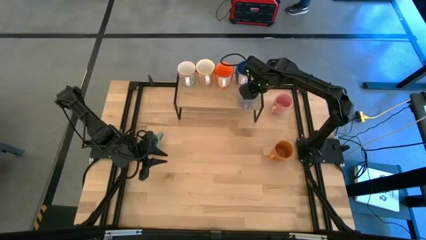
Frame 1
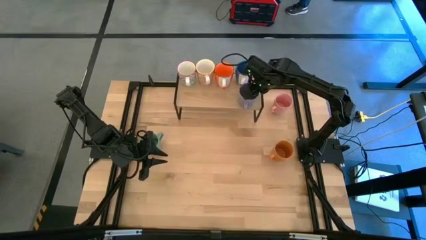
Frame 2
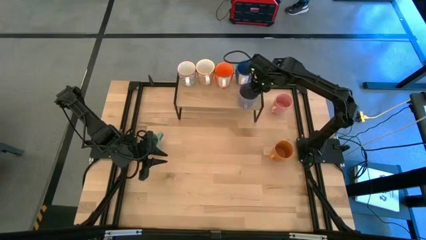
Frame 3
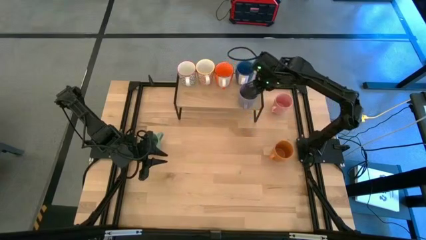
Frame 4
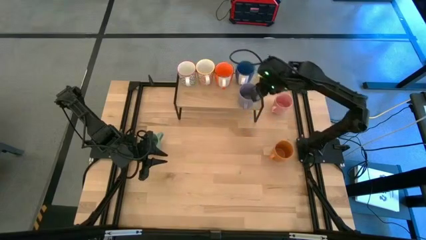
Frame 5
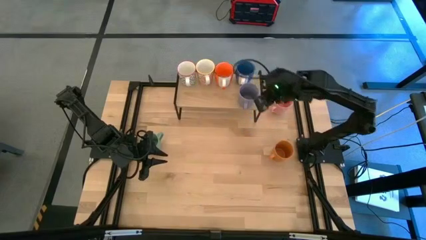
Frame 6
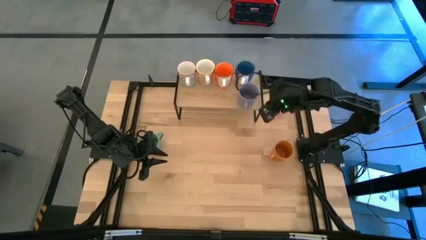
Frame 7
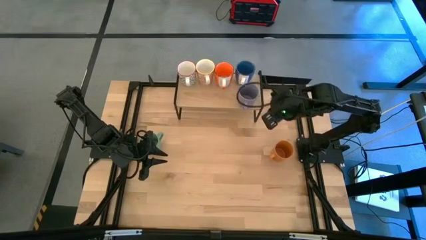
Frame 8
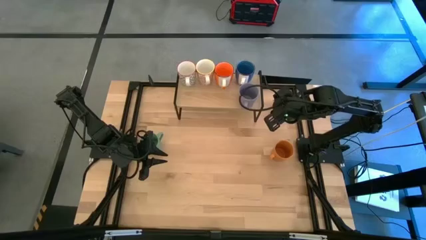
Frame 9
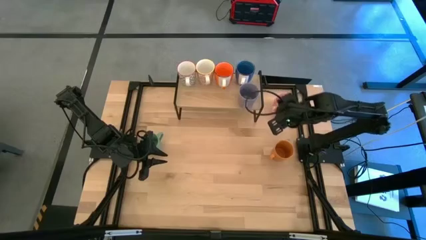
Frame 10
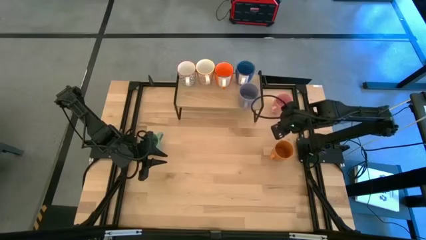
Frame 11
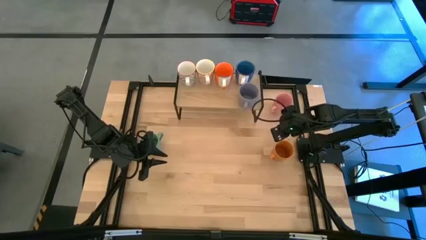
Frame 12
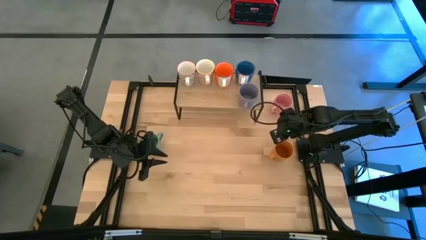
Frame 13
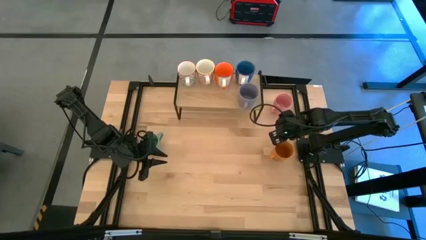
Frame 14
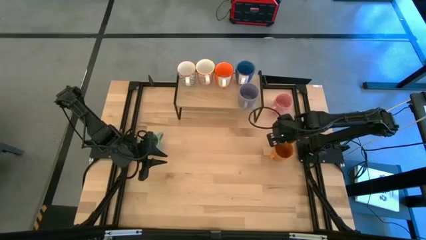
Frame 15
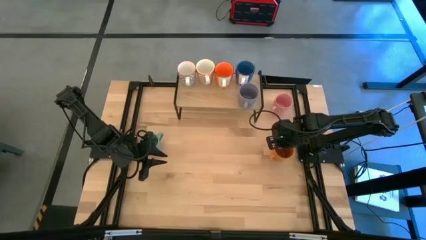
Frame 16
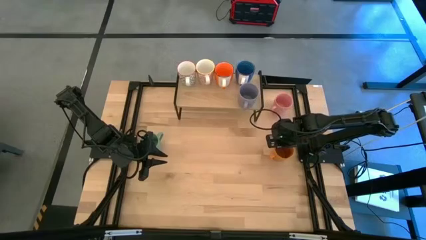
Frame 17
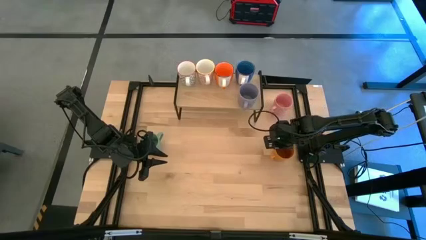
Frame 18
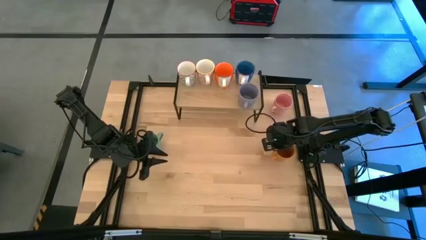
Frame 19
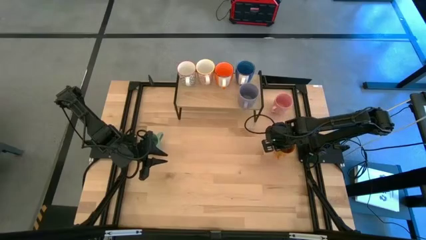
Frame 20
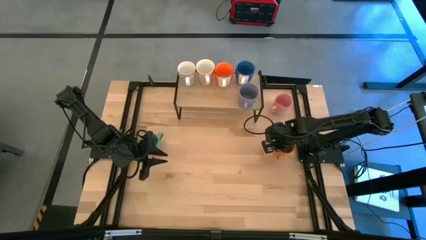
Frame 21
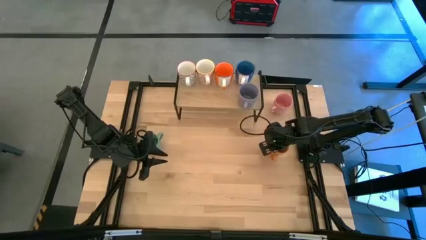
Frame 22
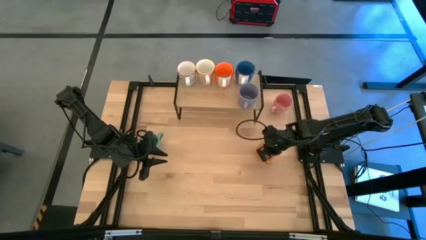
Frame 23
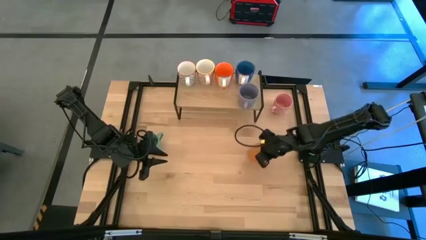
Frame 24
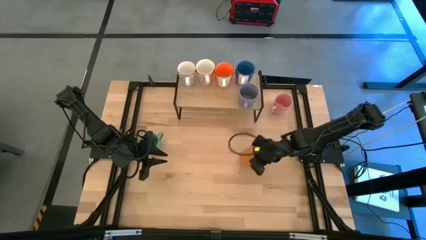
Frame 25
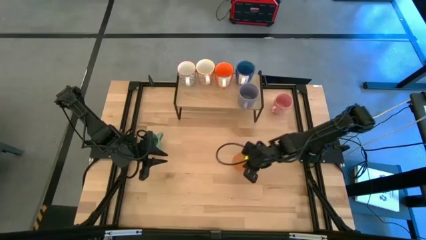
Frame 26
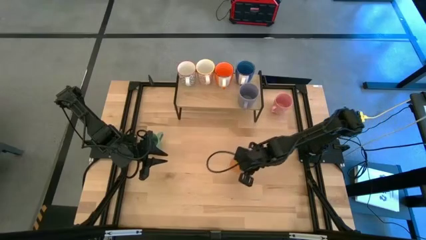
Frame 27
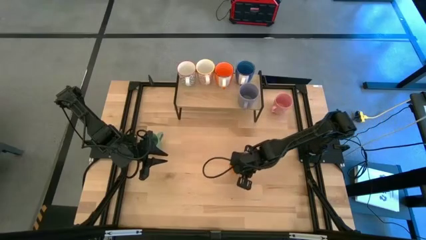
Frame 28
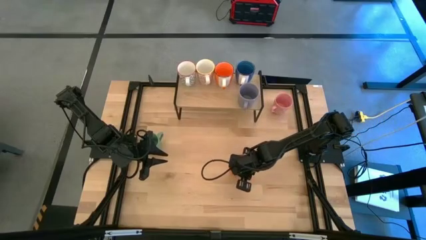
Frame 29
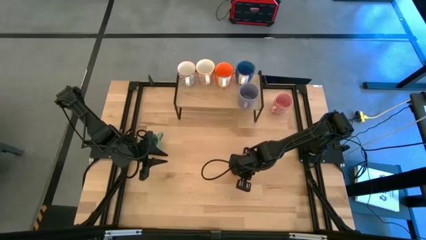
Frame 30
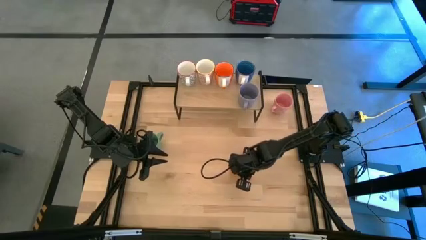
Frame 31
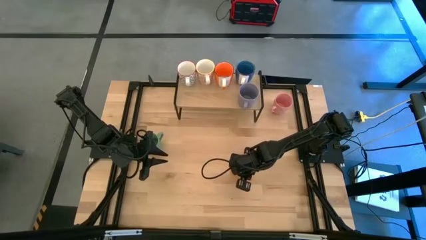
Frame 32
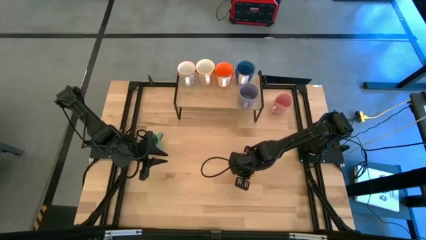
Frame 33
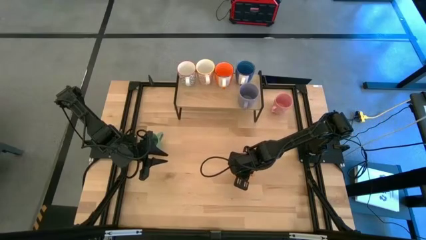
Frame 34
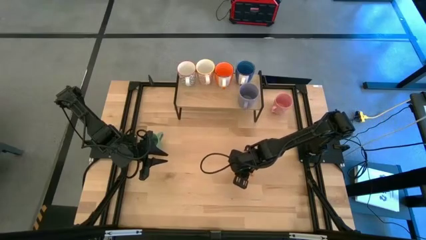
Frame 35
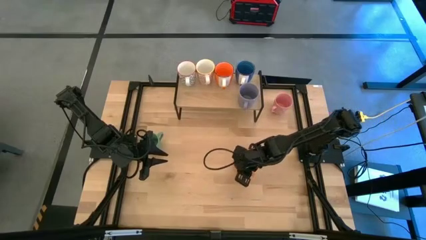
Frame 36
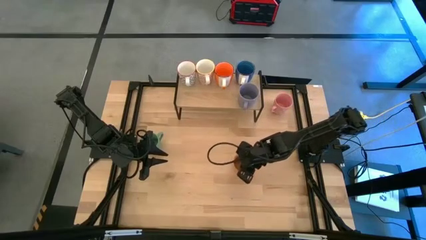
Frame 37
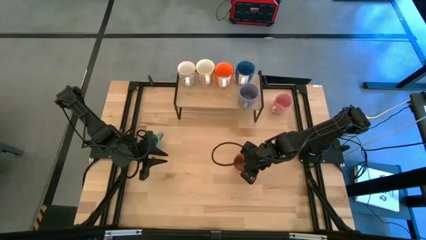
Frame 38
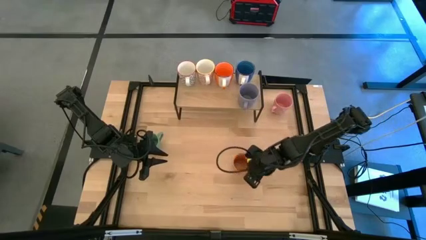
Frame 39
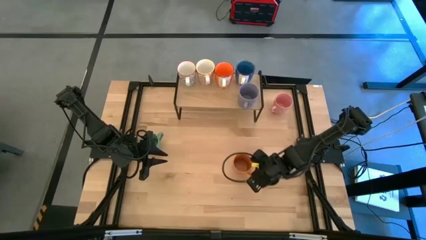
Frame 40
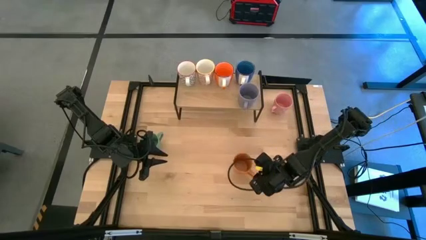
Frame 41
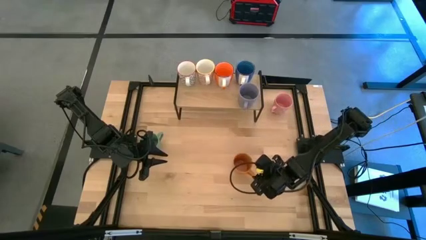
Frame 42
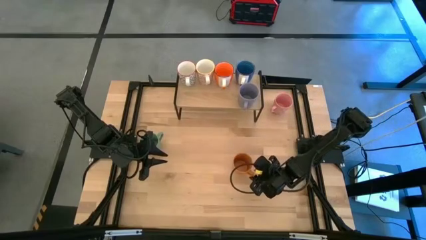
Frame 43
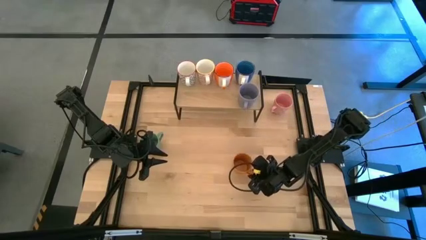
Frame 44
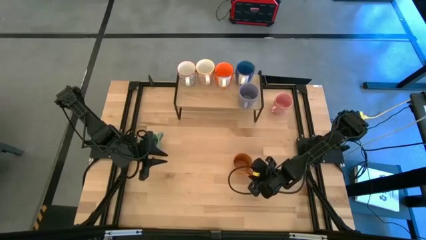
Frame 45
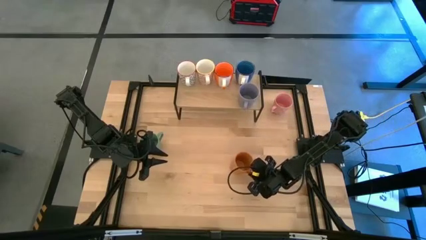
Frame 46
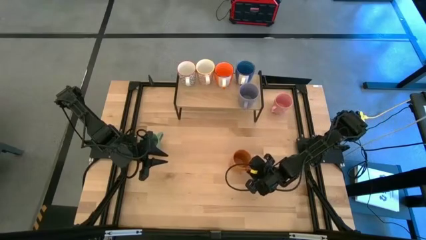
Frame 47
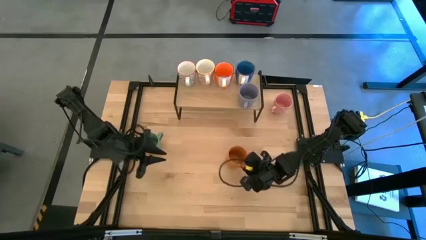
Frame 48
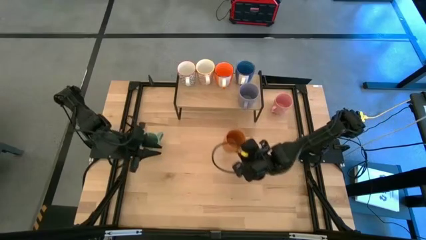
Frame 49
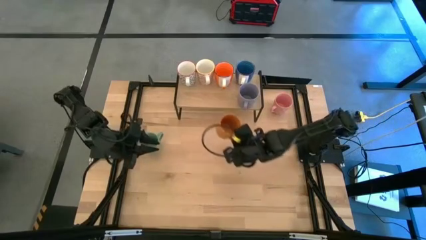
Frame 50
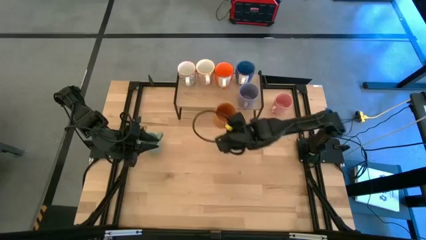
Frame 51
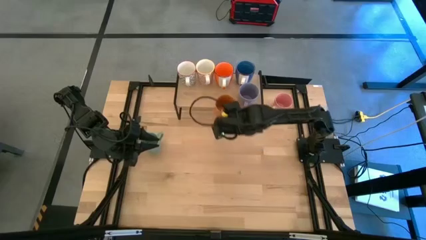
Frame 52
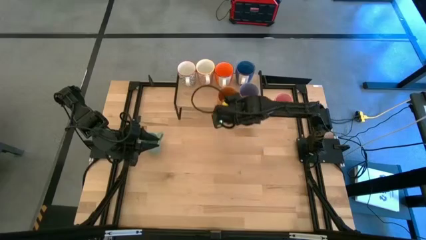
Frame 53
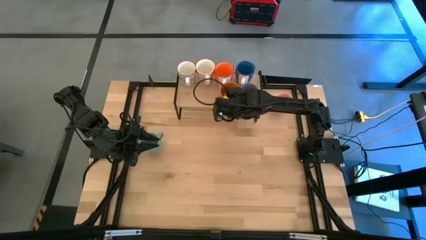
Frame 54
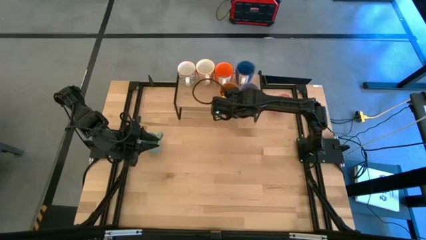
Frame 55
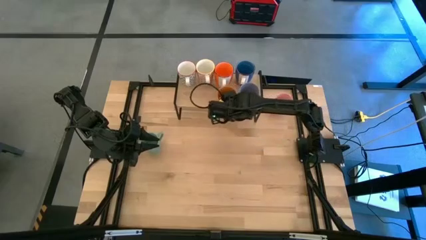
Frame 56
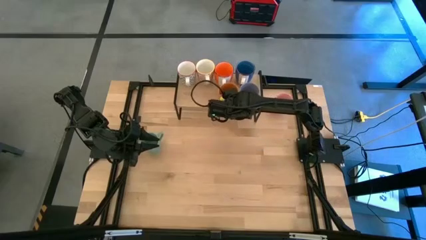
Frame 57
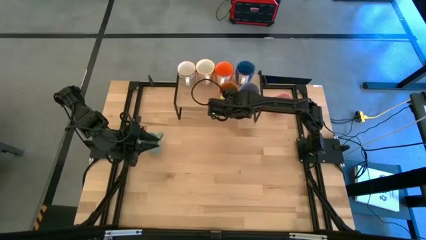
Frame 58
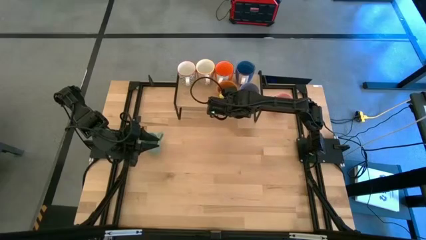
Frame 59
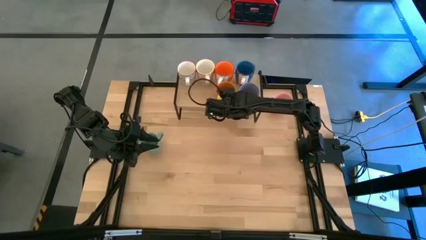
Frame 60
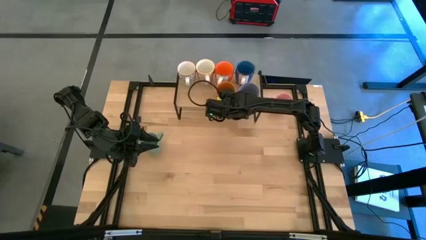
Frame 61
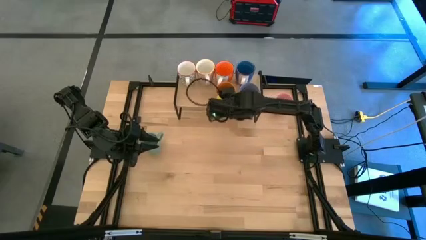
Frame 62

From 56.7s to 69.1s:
Task: Place coffee mugs
Put the brown mug on the shelf

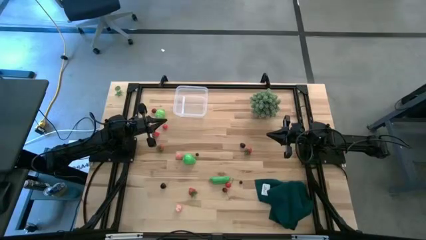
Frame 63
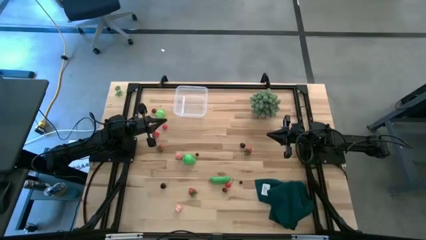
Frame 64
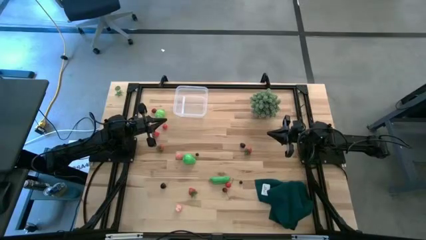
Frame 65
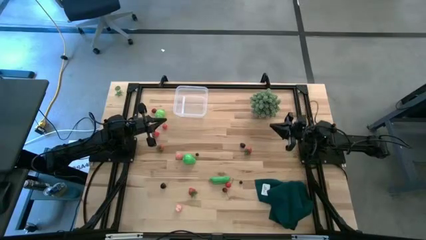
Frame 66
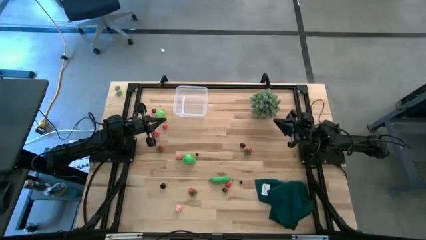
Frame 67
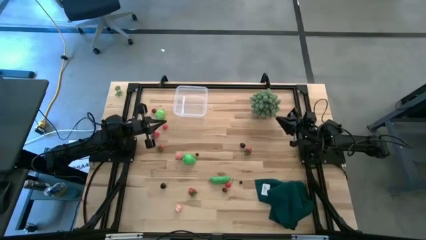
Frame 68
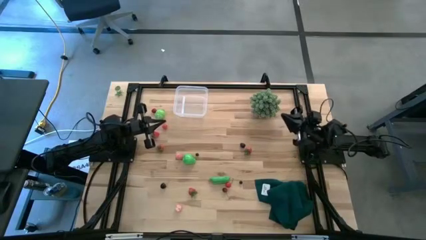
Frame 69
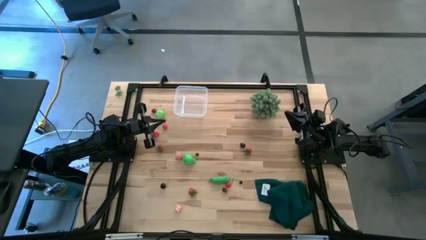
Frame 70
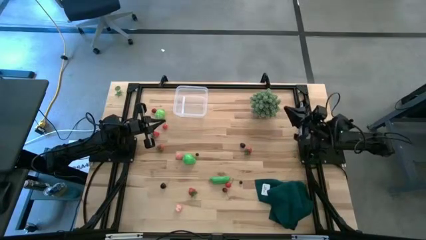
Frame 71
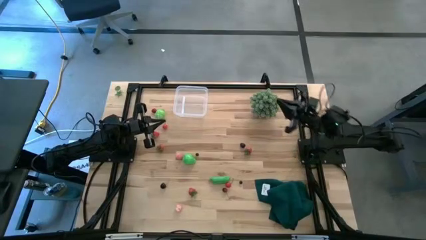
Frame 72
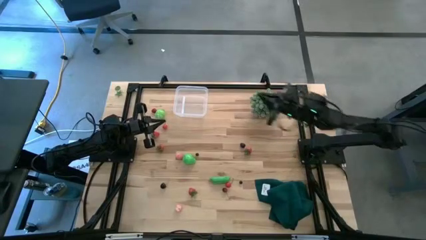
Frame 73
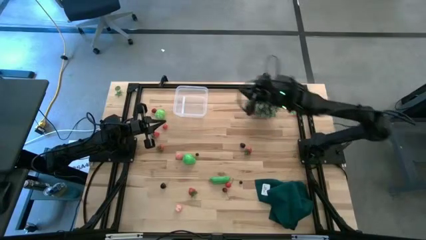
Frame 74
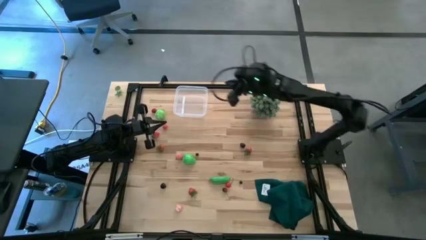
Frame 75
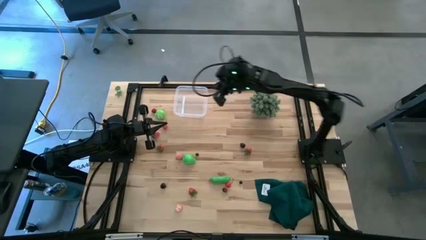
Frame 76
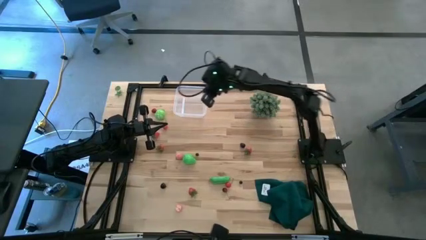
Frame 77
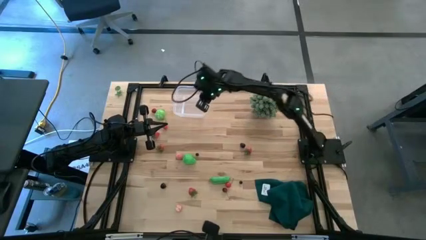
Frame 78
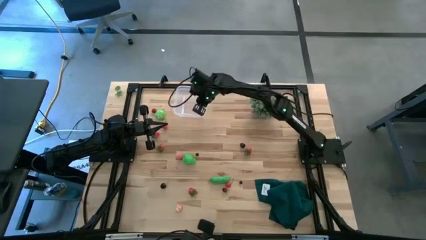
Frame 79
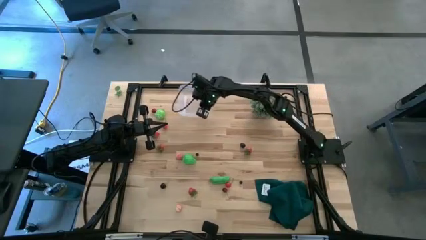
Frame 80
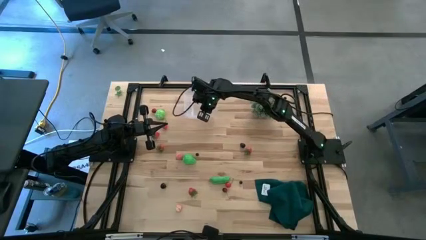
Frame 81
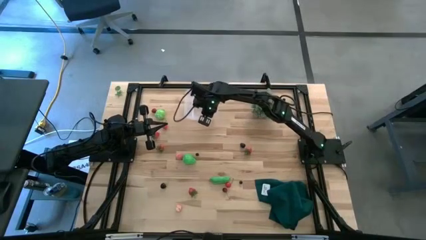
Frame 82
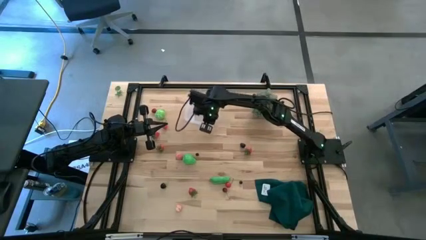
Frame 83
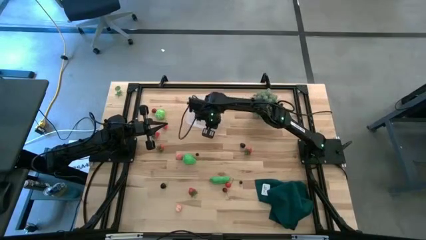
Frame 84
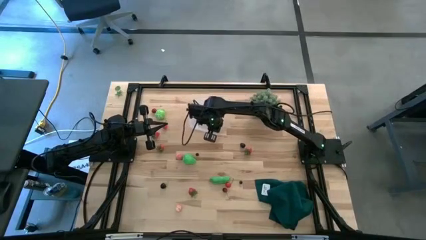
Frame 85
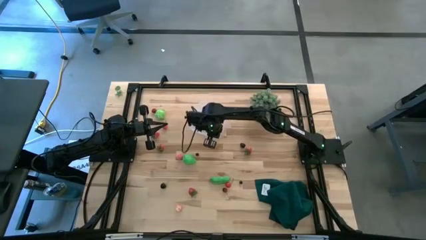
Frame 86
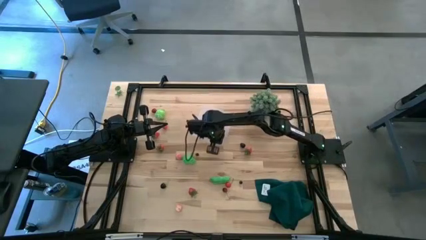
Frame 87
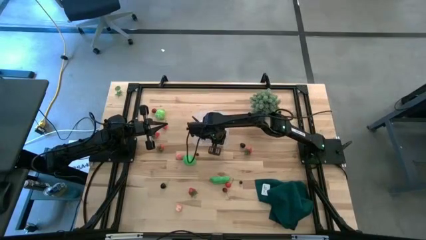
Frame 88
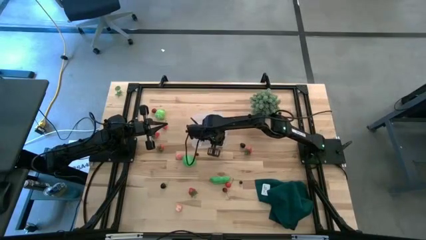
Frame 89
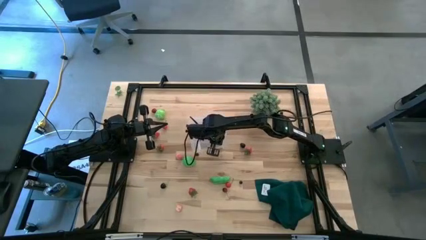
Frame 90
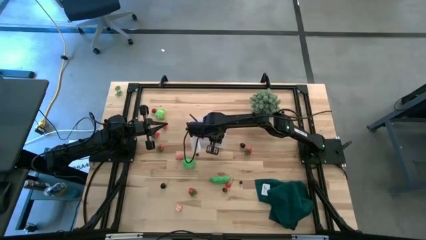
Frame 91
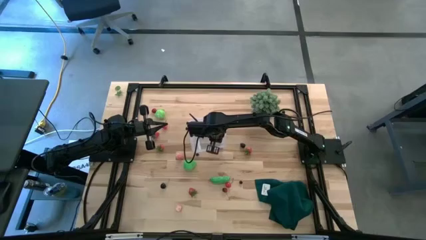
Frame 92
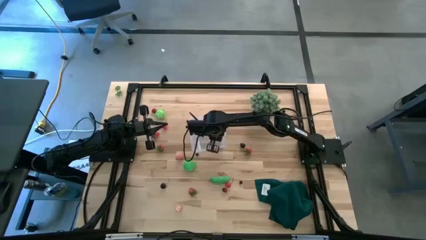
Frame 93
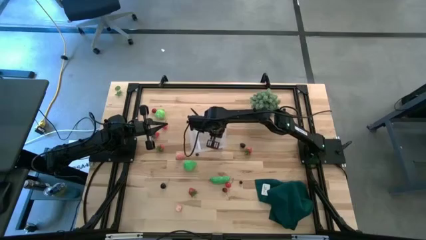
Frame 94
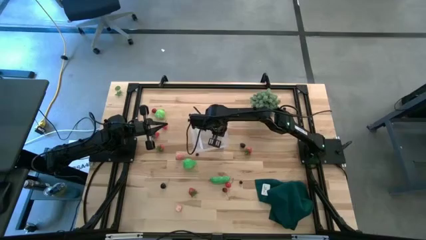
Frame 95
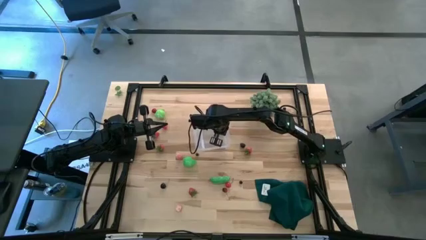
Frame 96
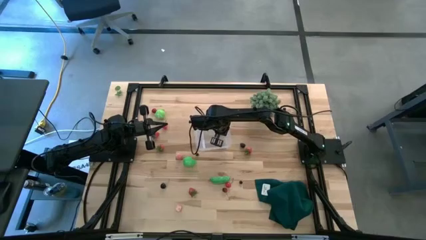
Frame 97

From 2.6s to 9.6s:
Task: Pick and placing Produce into tupperware
Move the transparent bin to the middle
